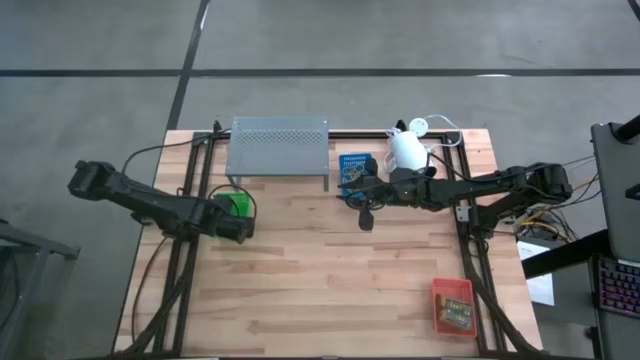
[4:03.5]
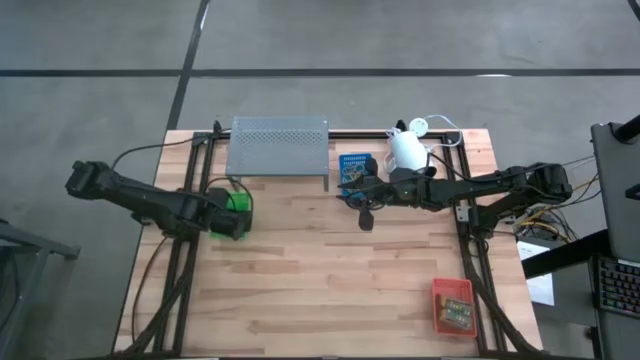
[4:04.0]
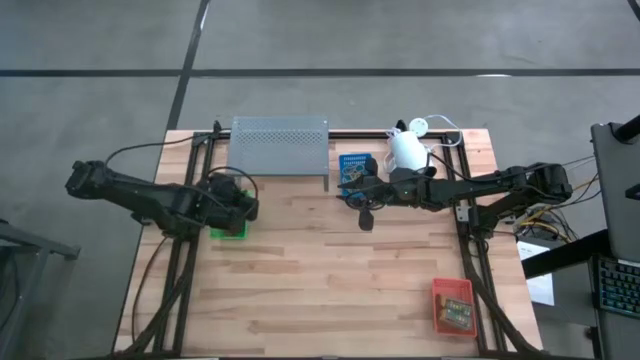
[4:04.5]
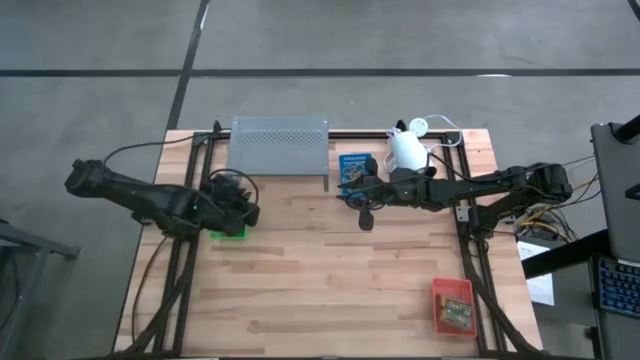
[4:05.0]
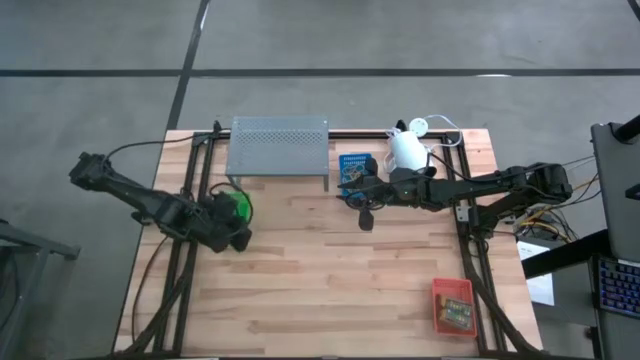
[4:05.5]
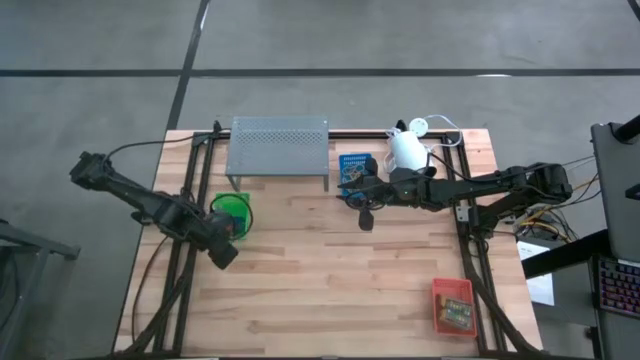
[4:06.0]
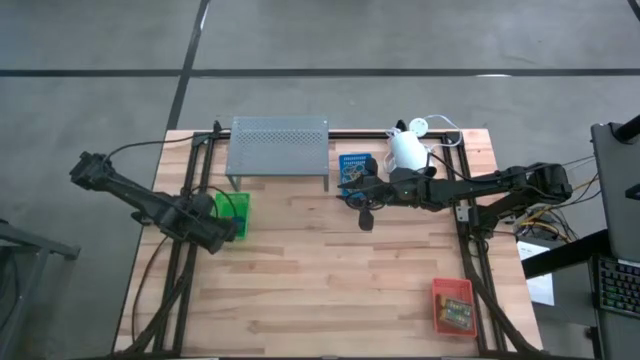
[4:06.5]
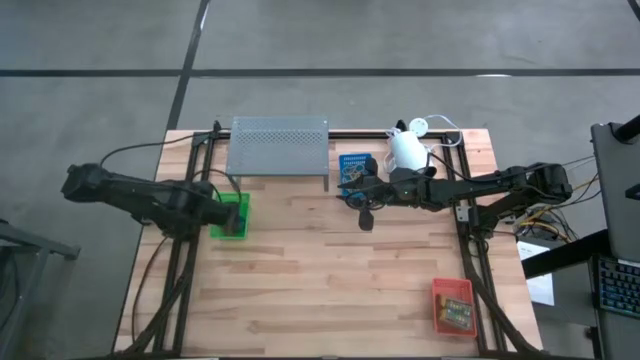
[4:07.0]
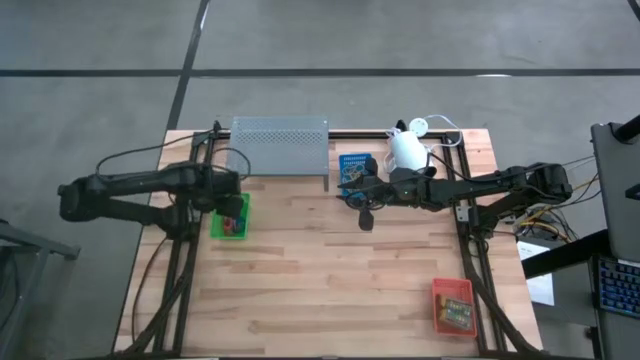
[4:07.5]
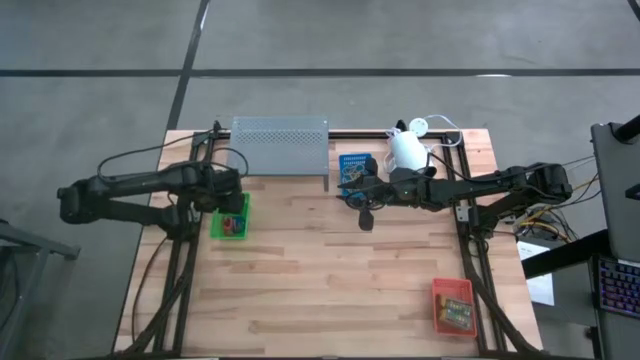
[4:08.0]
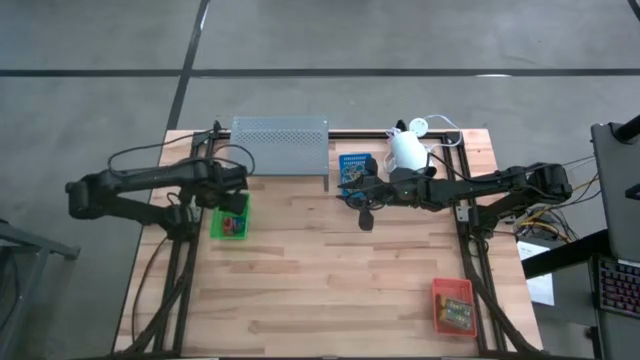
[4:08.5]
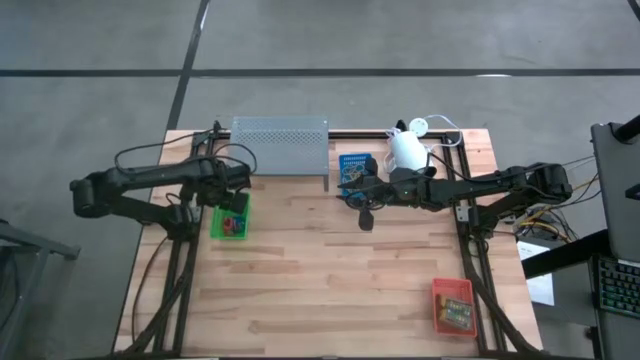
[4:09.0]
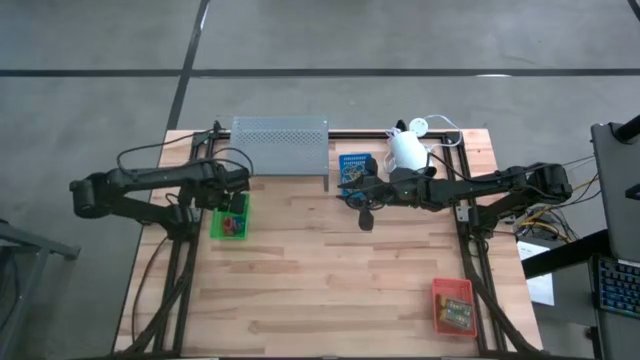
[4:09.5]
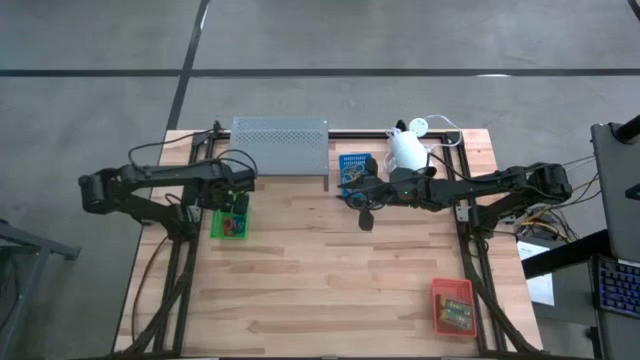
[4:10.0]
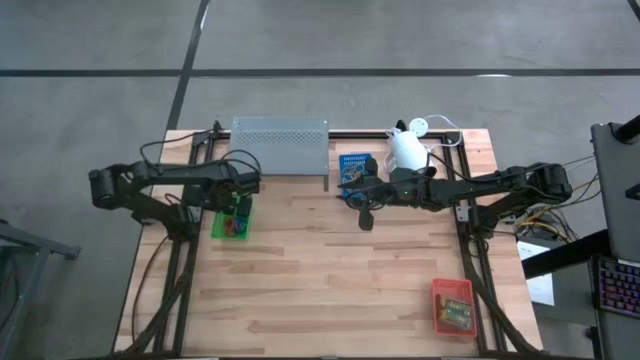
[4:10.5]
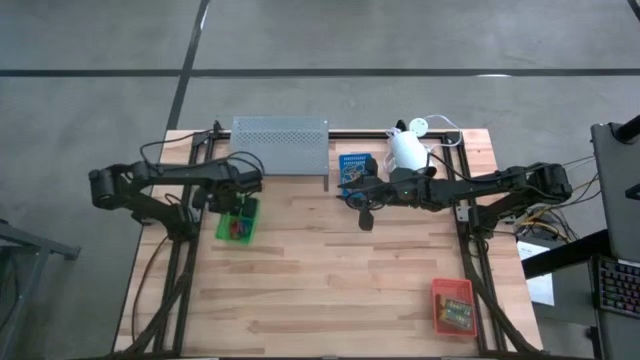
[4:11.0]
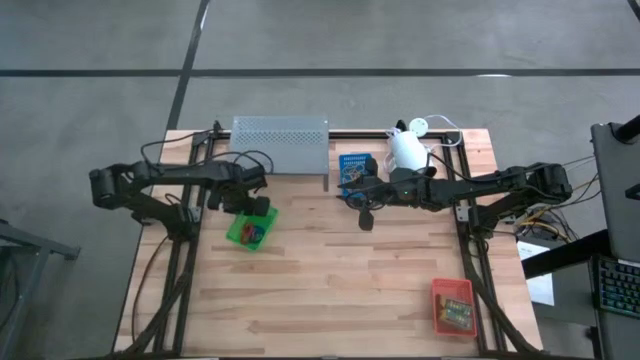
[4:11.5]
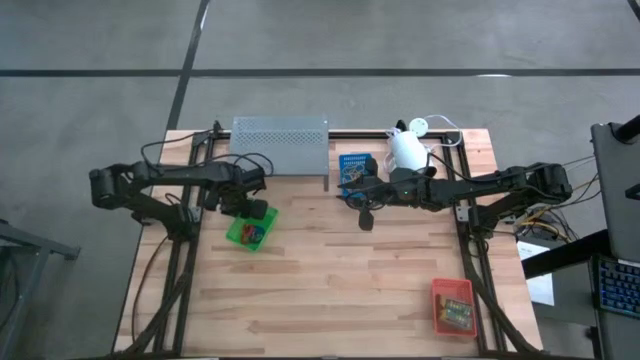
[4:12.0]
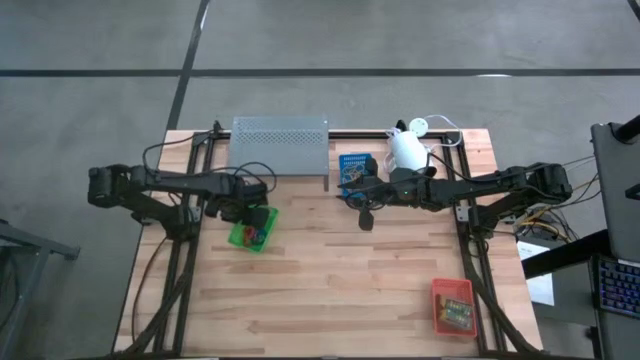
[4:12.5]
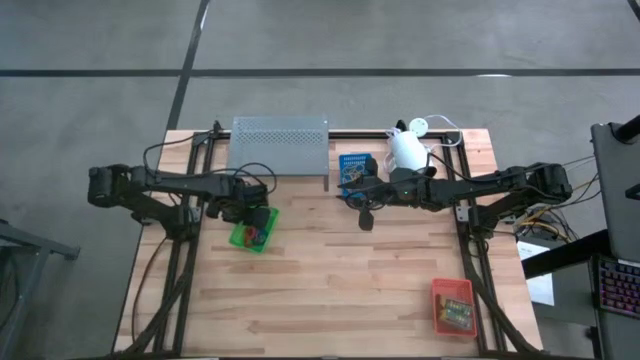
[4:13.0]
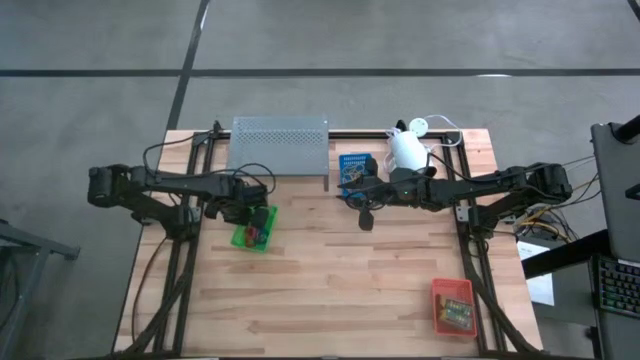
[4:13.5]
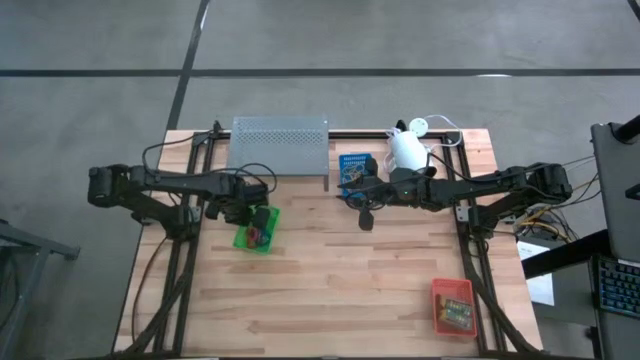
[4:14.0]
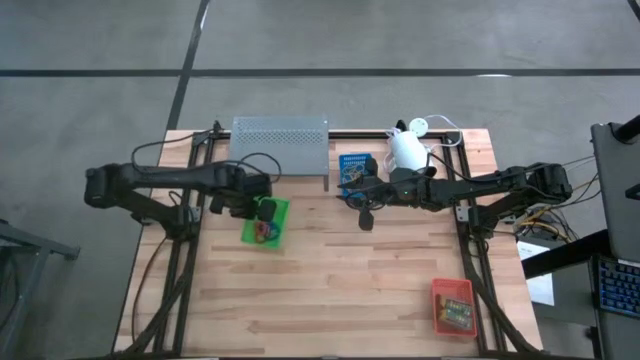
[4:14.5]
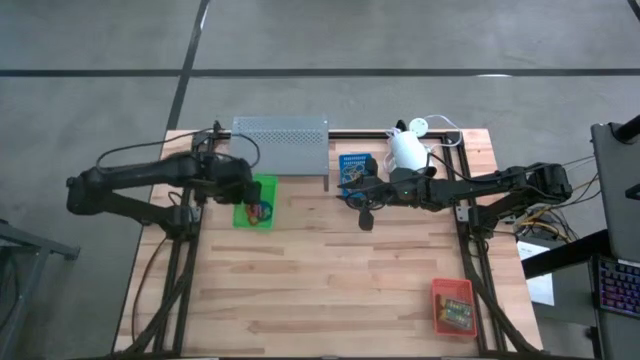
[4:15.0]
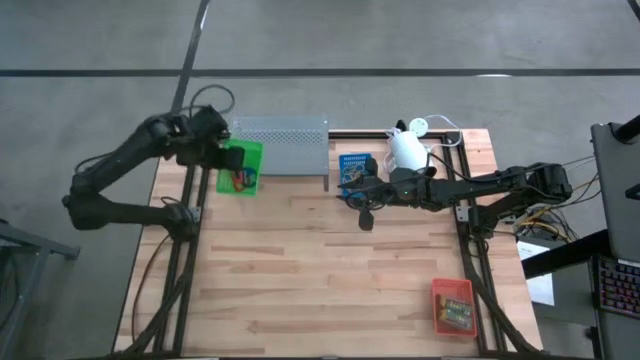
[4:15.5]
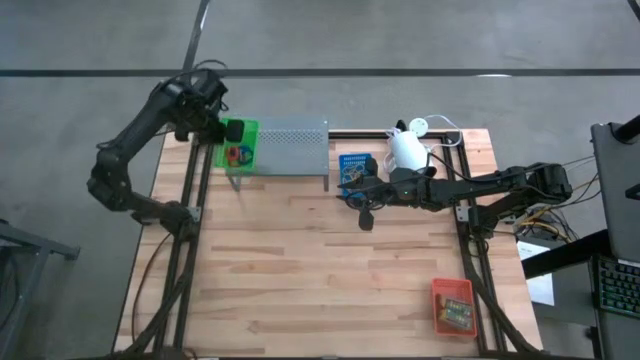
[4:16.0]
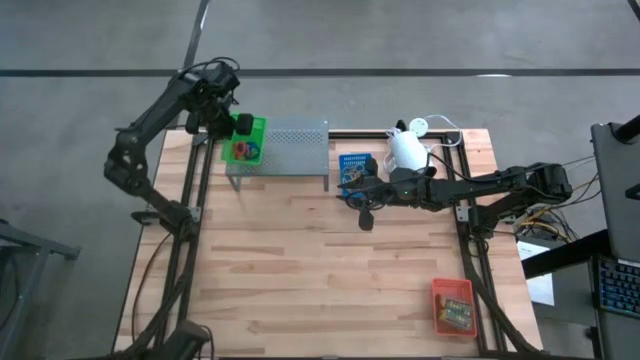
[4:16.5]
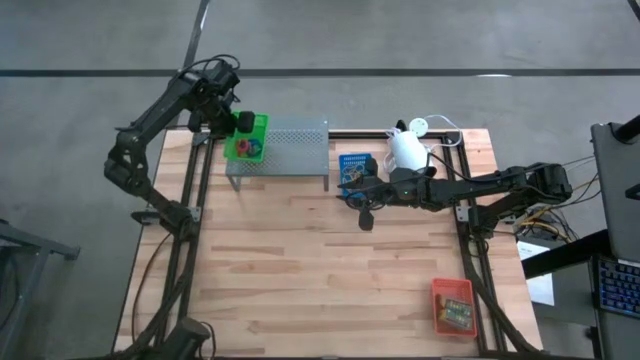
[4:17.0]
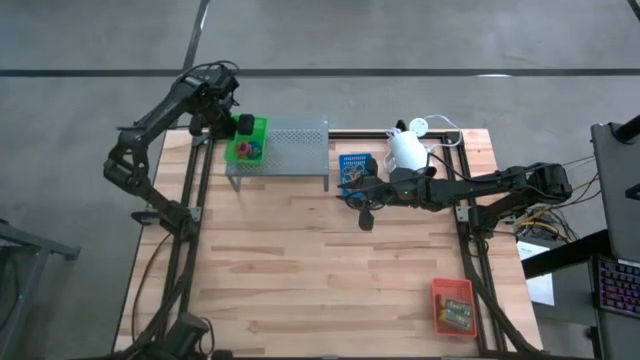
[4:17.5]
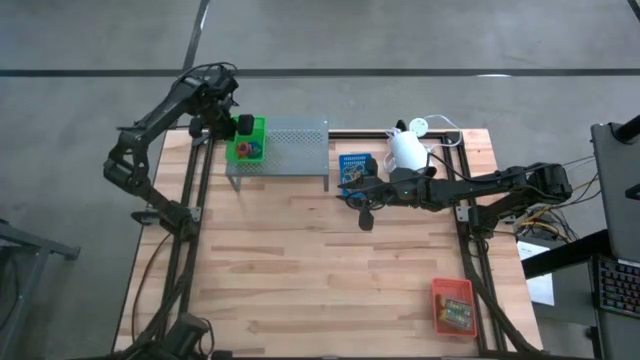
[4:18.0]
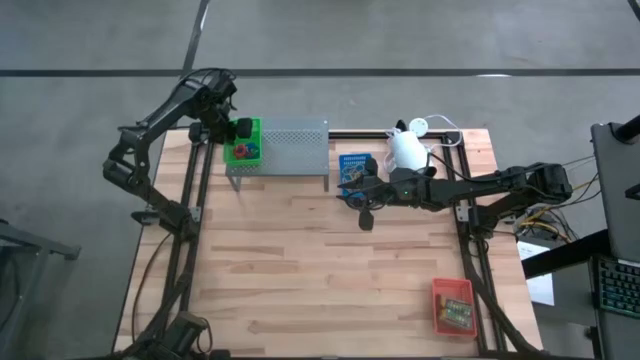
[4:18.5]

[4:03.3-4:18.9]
Task: Pick & Place Office Desk Supplies
Put the green bin on the shelf

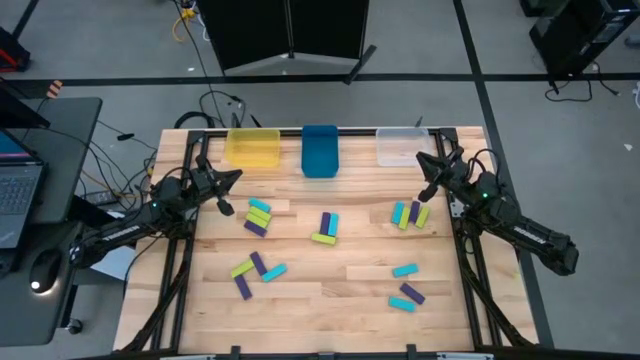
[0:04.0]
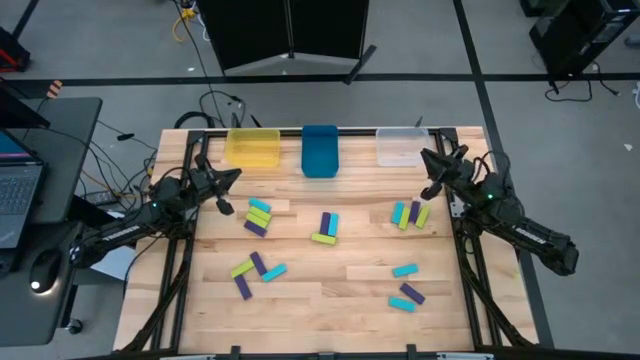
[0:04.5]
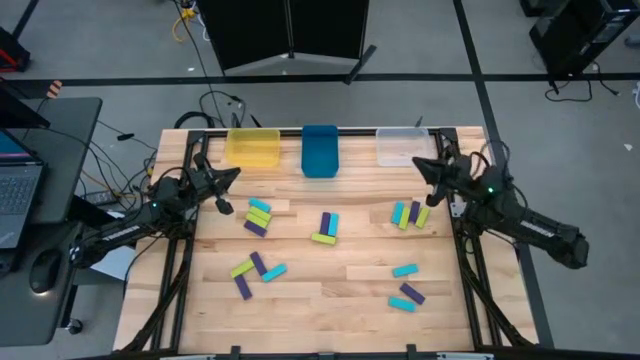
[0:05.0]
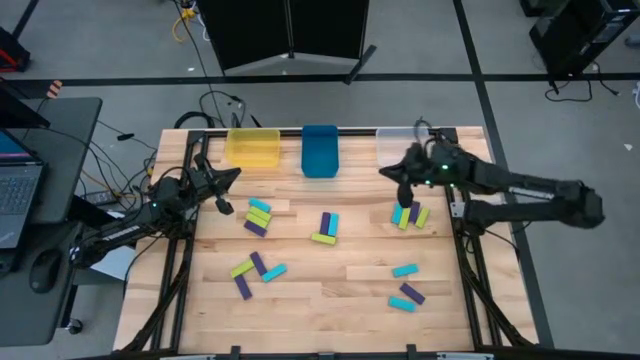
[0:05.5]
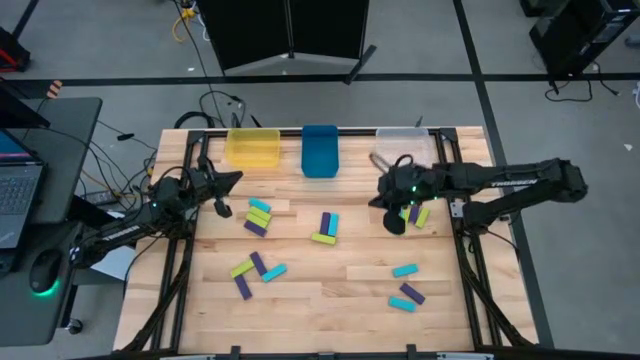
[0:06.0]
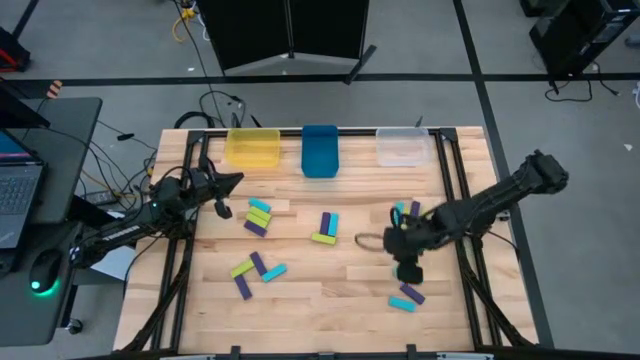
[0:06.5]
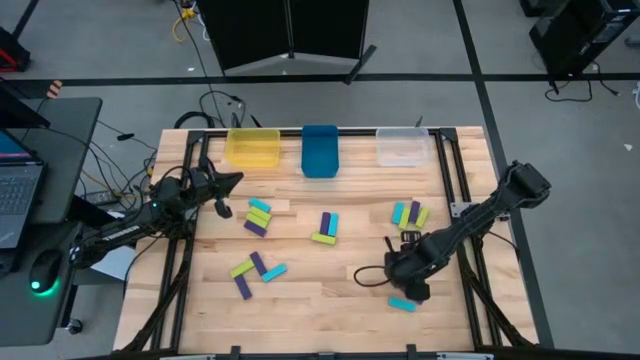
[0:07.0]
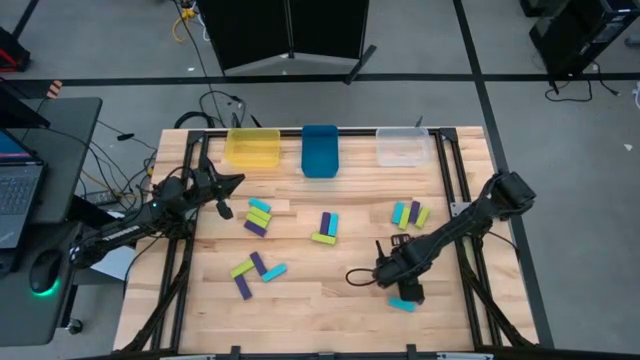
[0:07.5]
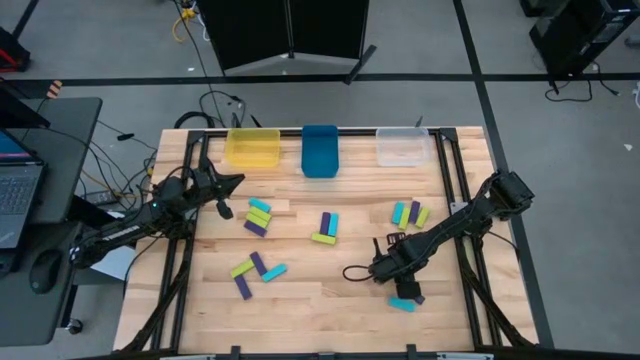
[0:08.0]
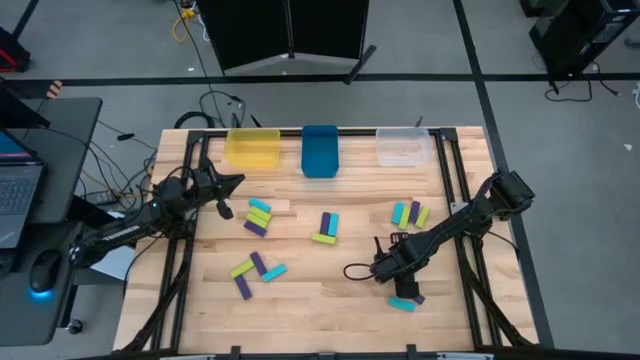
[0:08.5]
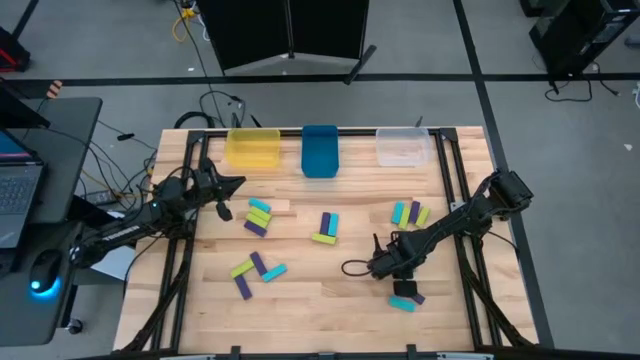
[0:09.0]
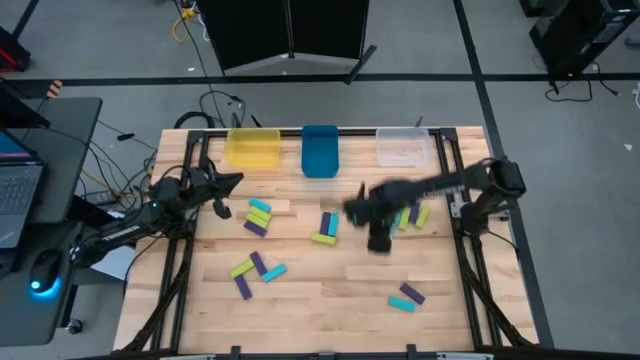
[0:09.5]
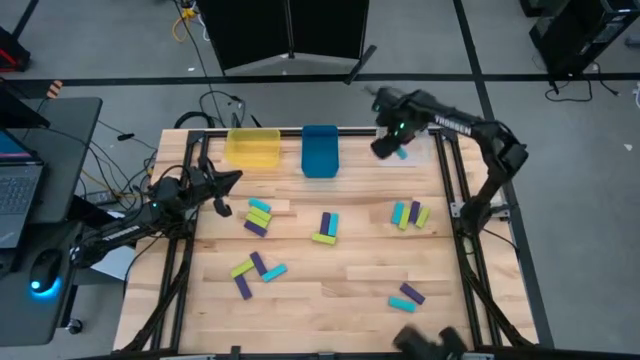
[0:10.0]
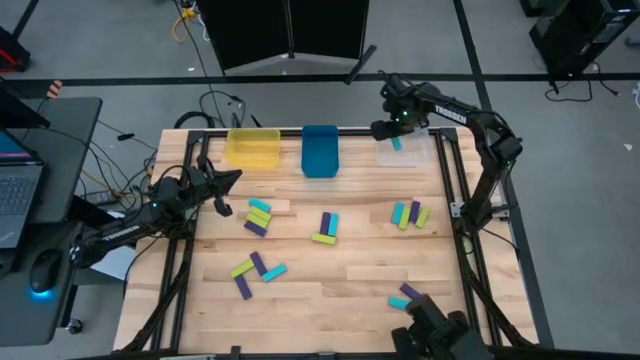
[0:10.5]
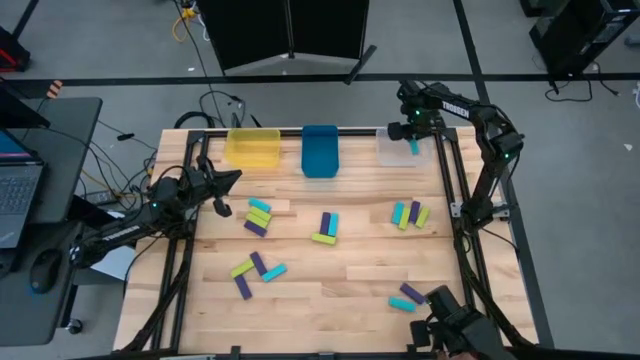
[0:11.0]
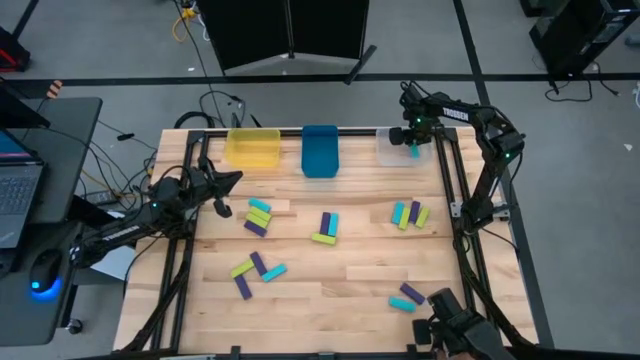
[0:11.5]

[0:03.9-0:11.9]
Task: Sort blocks
Put the blue block into the transparent bin
